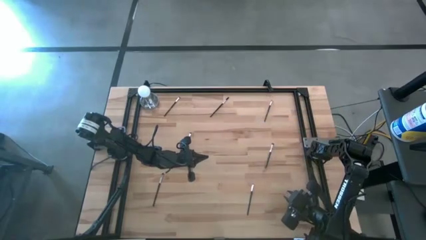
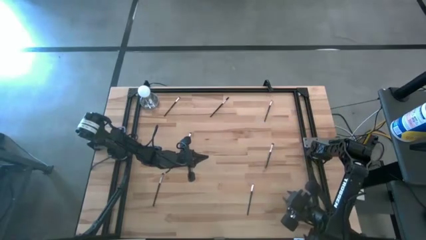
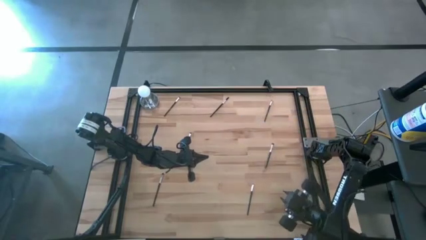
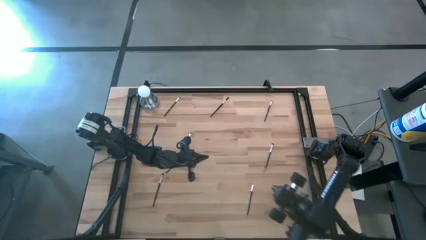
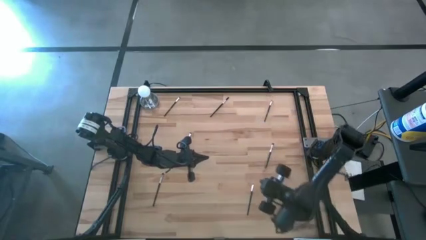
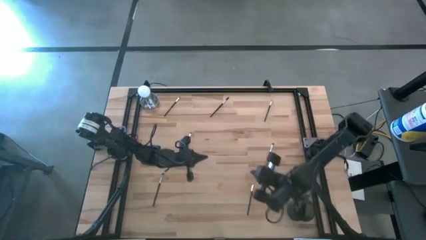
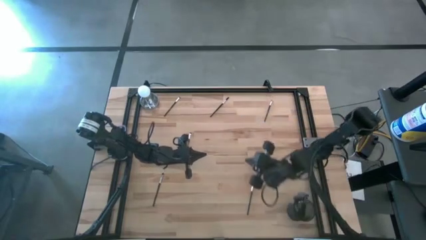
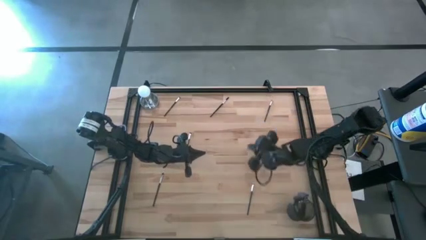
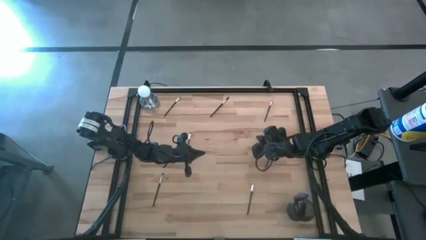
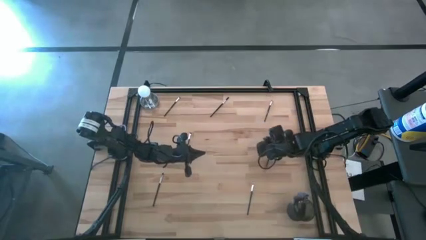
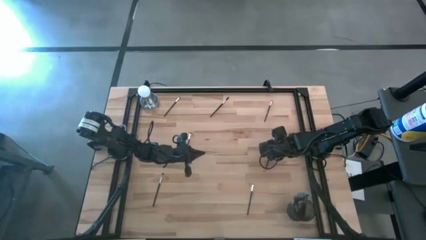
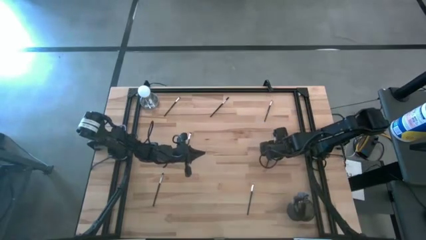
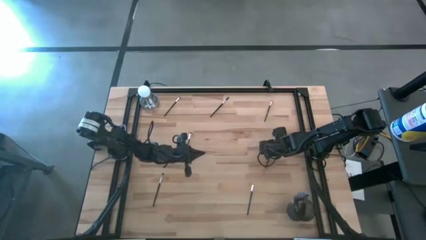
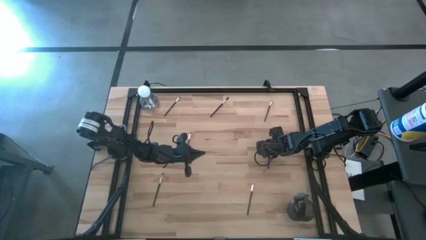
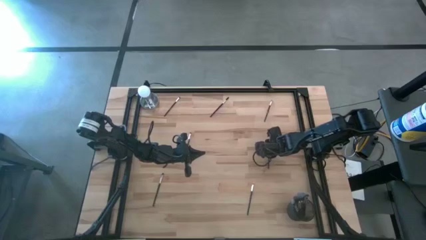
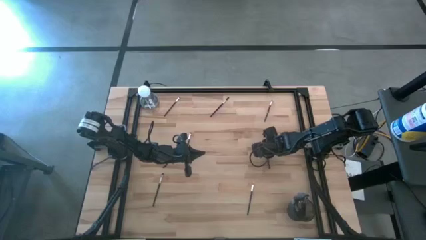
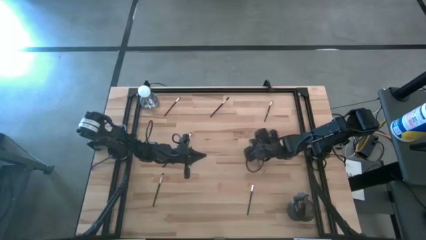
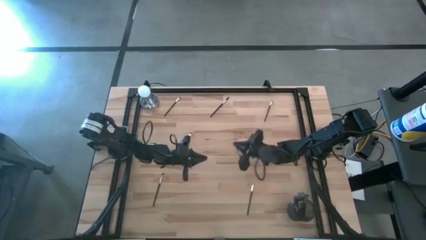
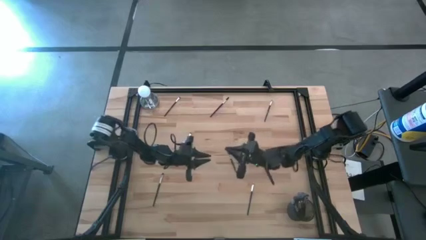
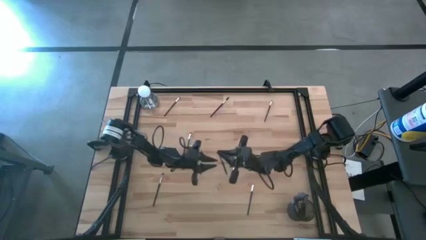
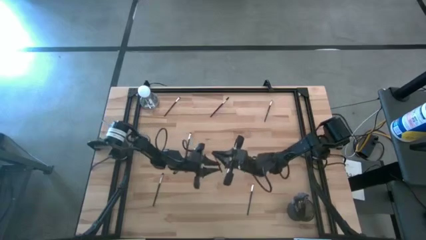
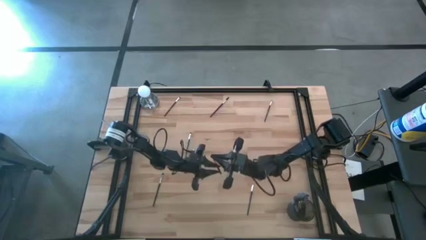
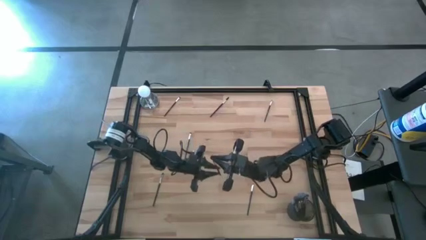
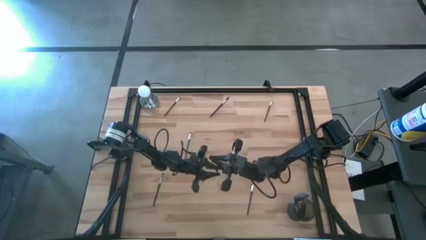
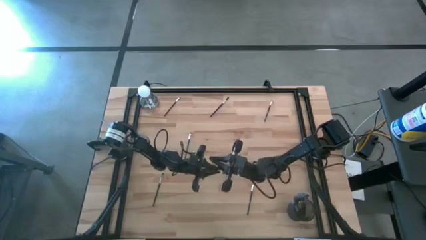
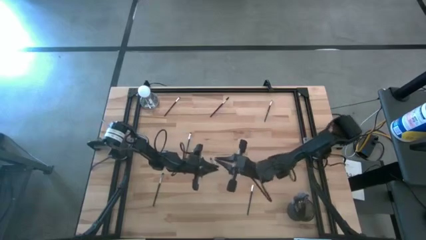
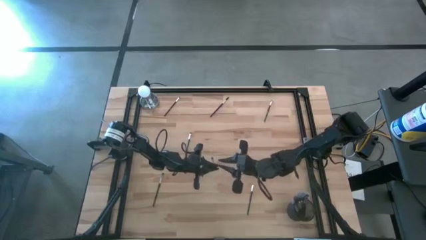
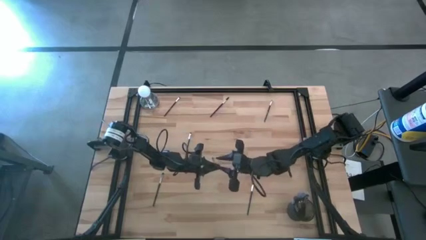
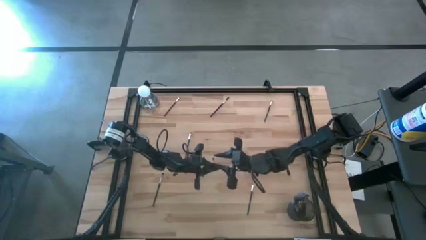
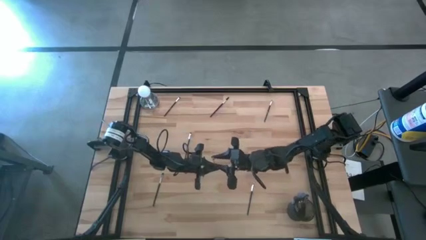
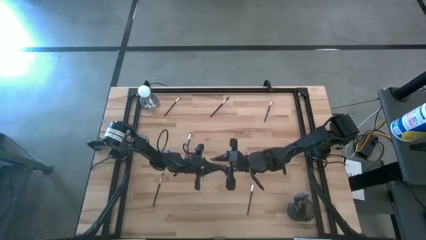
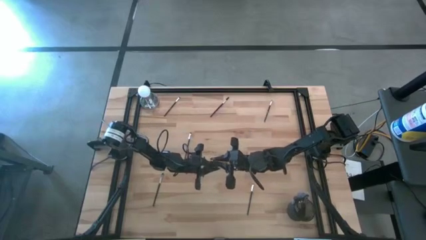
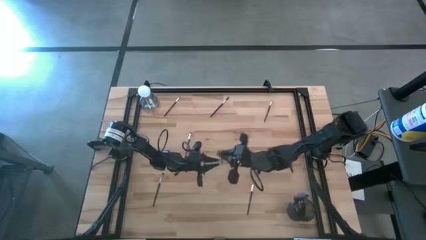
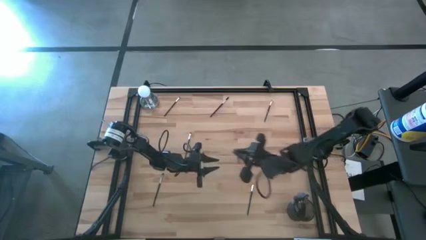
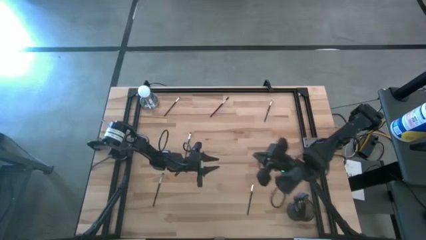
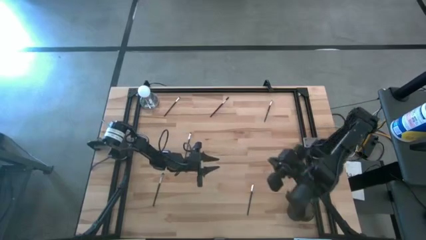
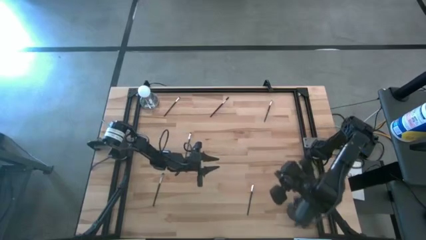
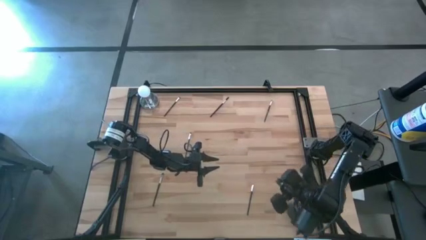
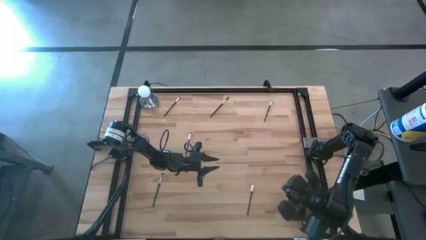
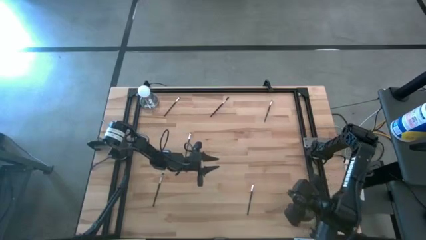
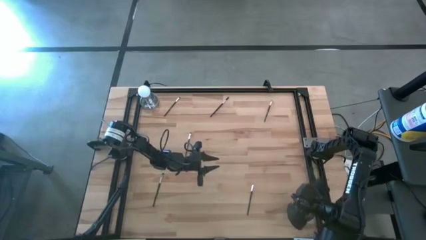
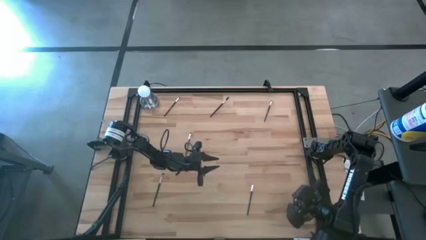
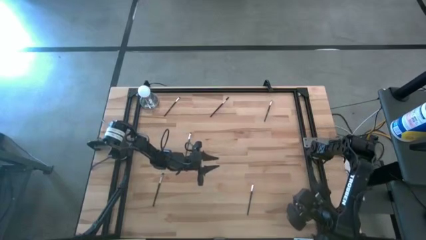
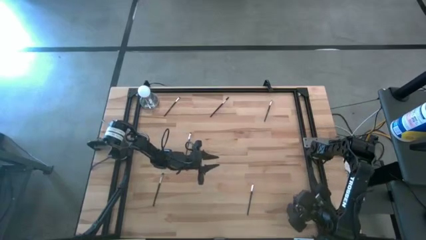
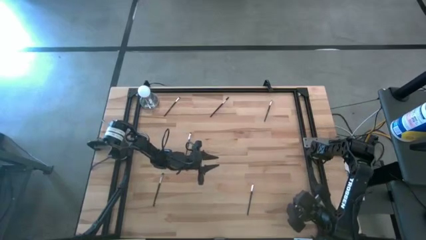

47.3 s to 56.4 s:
Task: Pick & Place Makeup Brushes
Put the black eyeshadow brush into the makeup holder

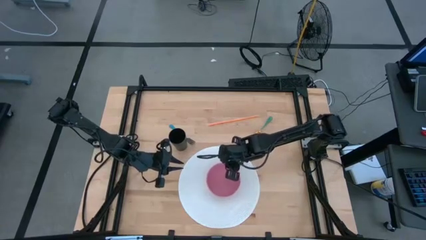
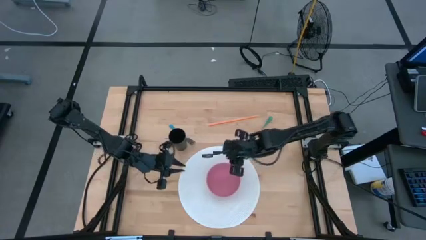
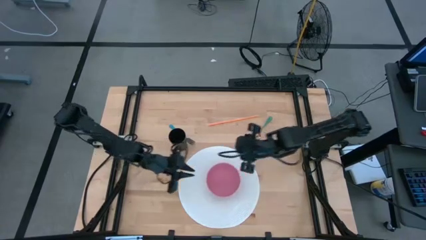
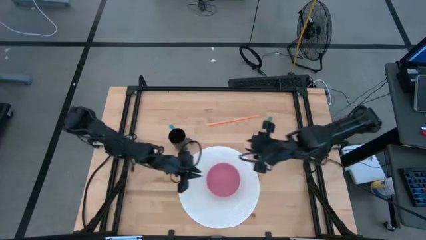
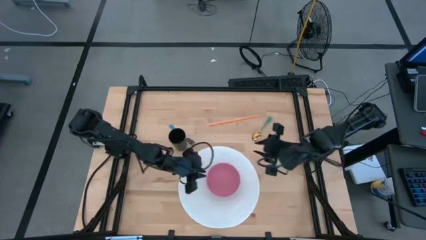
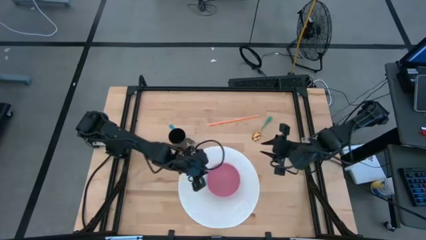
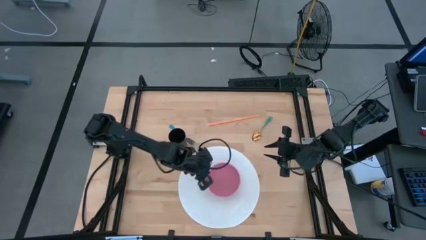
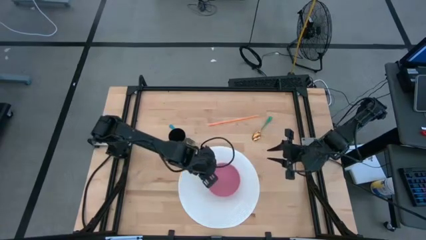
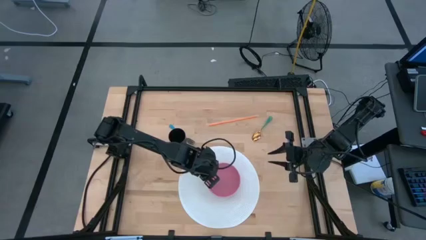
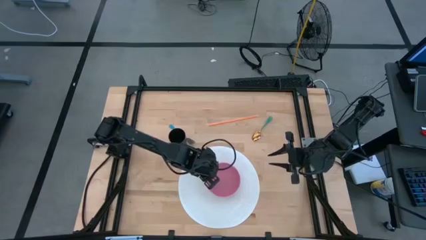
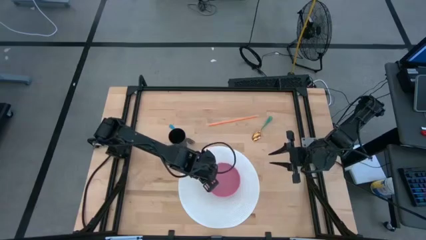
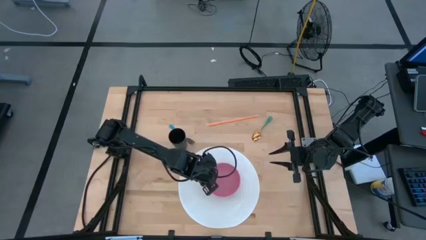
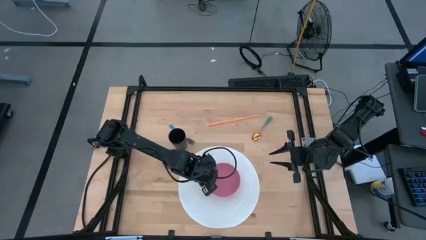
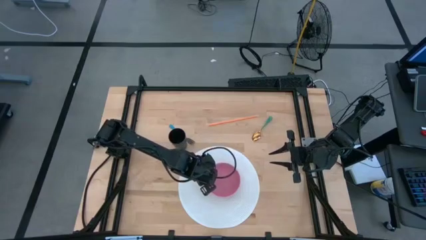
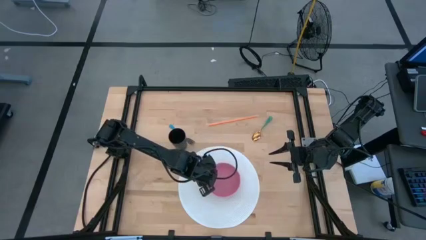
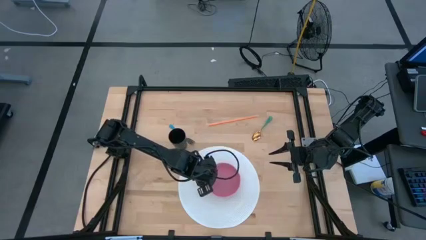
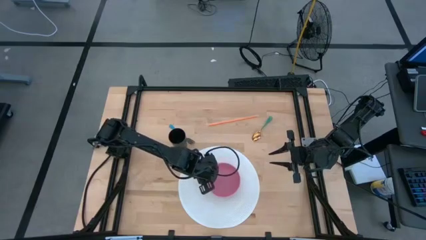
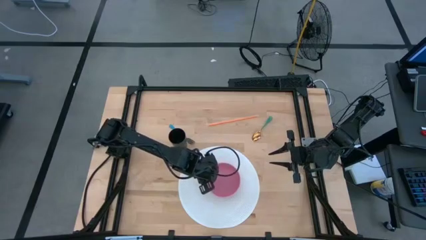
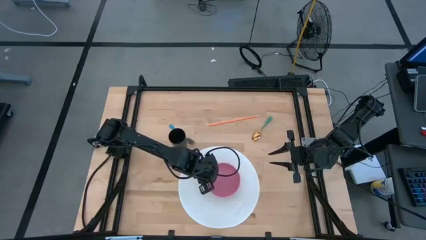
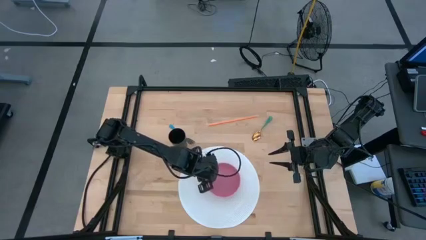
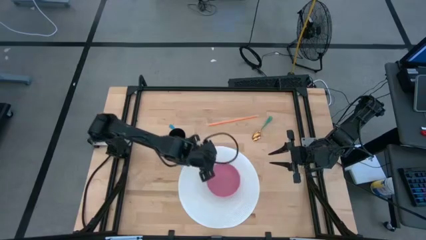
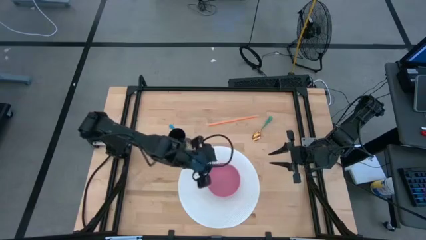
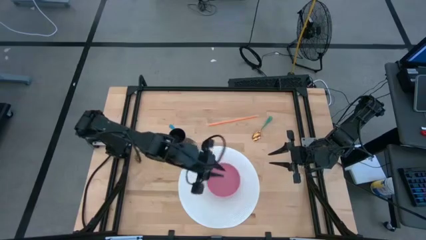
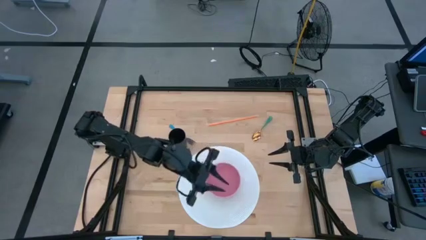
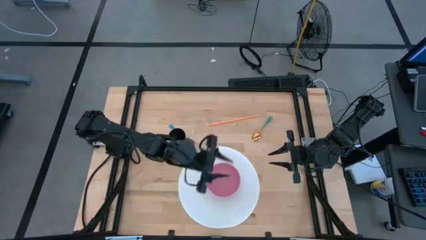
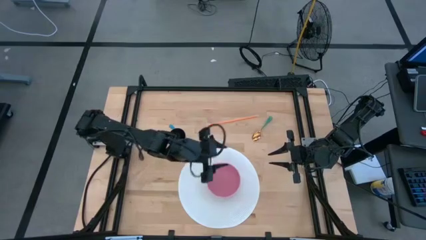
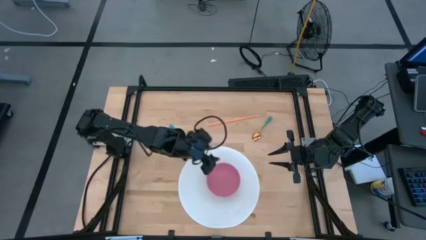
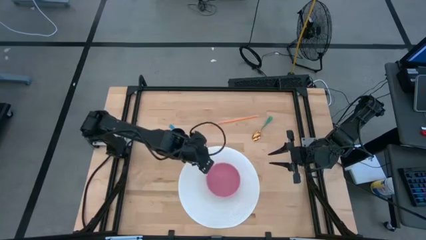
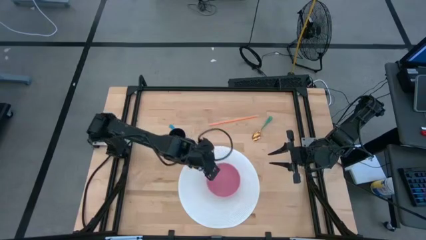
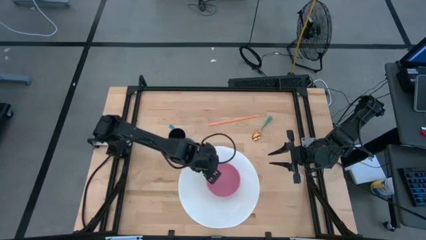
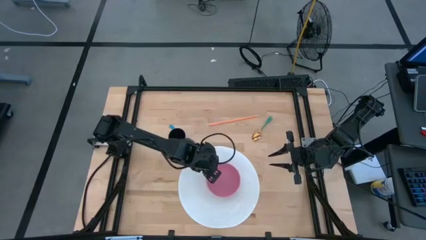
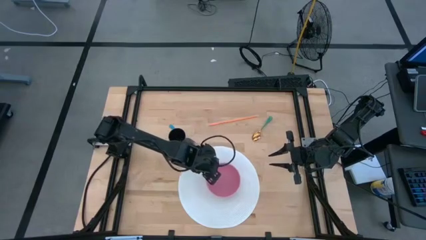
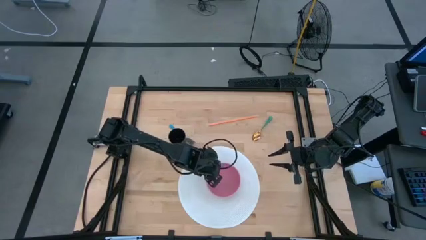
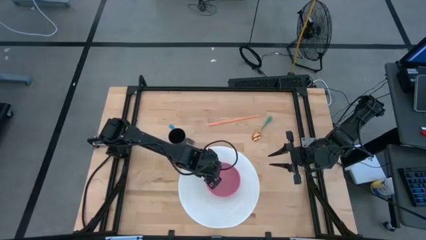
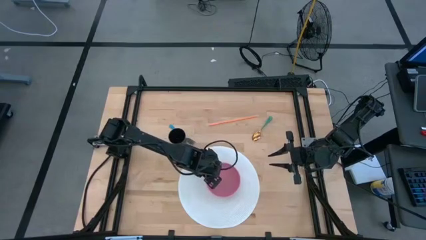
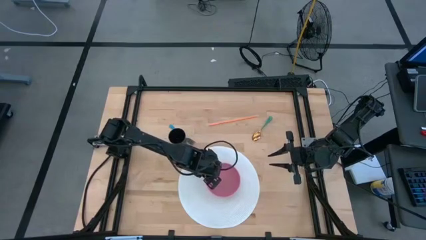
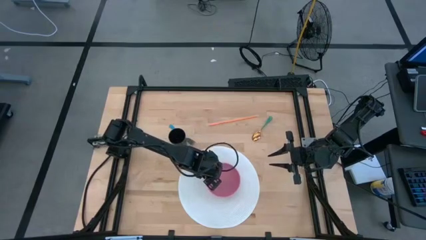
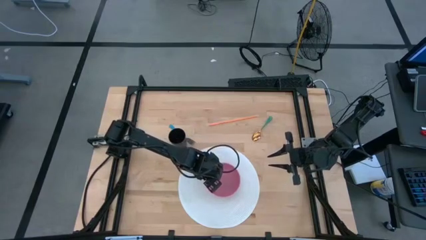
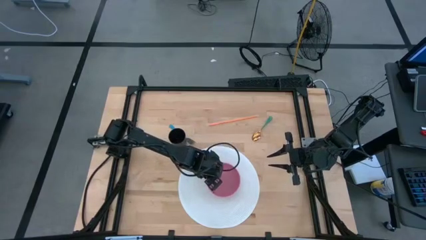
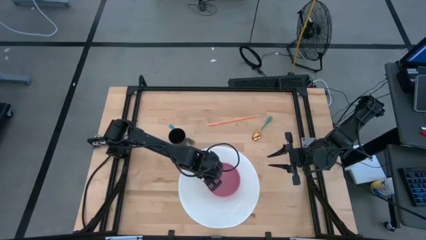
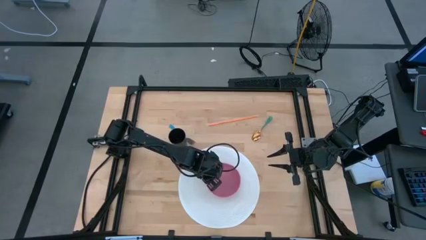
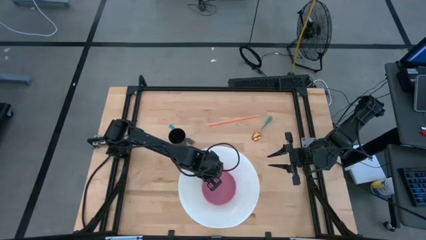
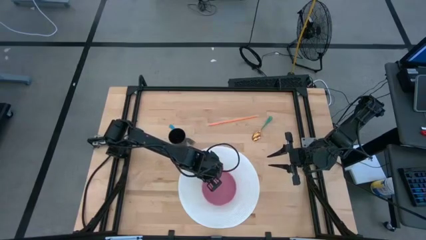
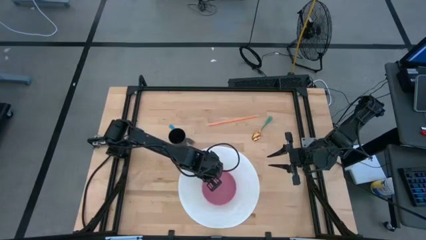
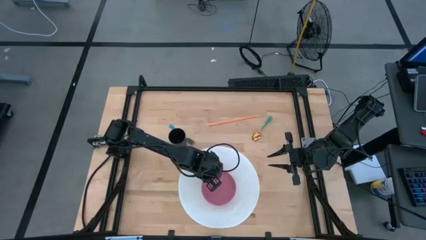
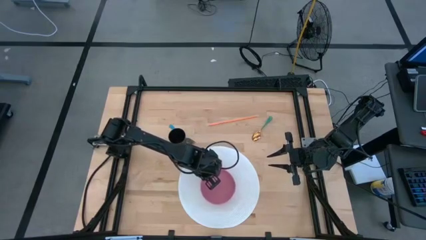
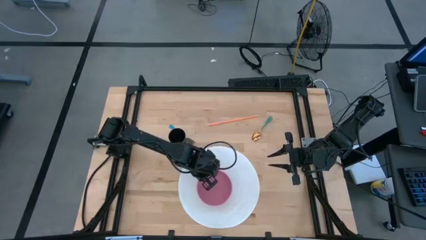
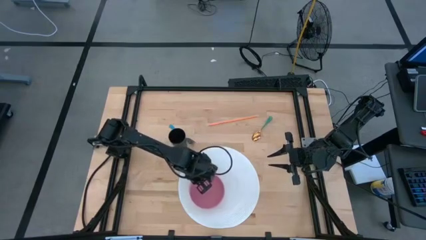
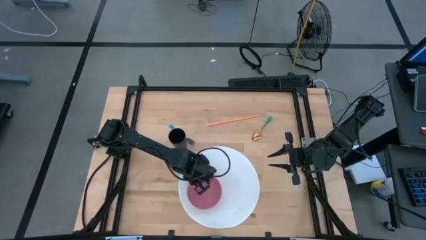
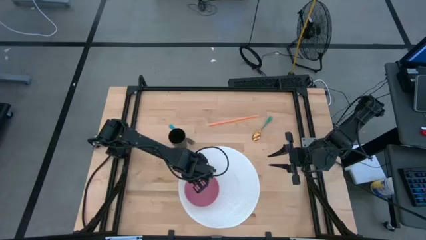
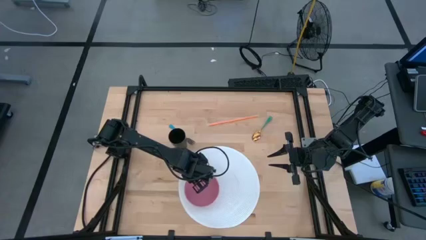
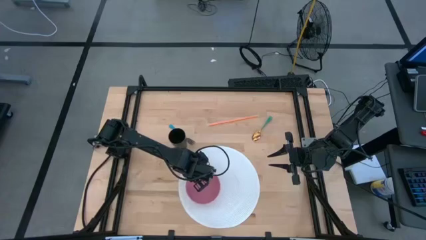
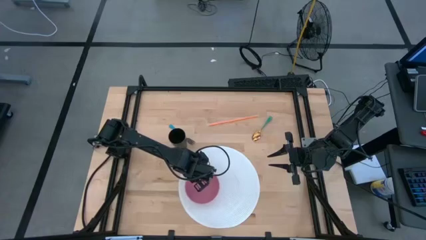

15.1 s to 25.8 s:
Task: Pick & Place Utensil
Put the pink bowl on the white table mat
